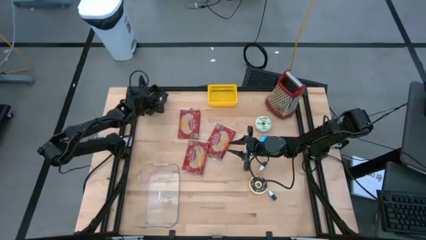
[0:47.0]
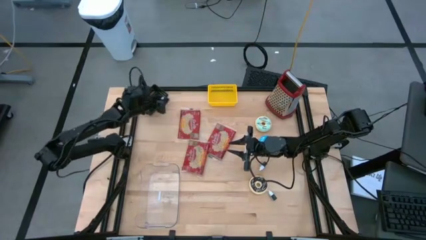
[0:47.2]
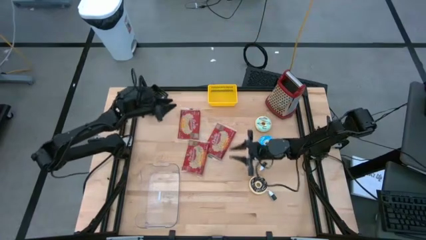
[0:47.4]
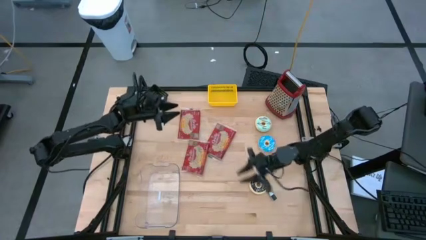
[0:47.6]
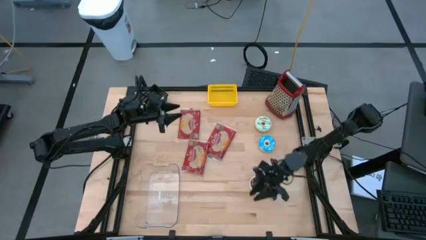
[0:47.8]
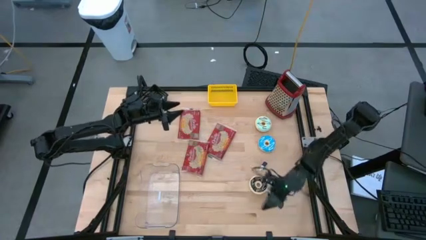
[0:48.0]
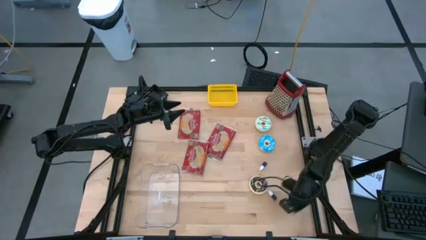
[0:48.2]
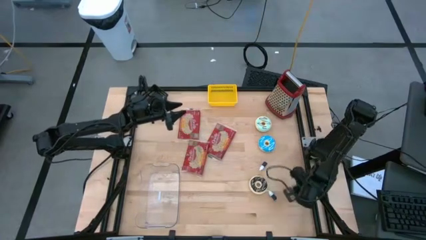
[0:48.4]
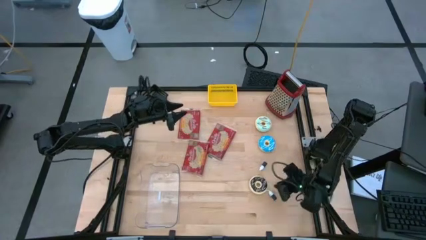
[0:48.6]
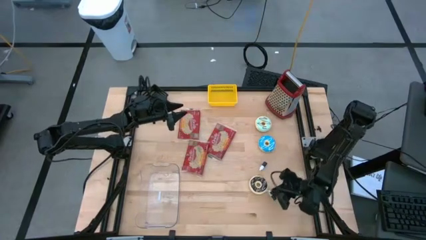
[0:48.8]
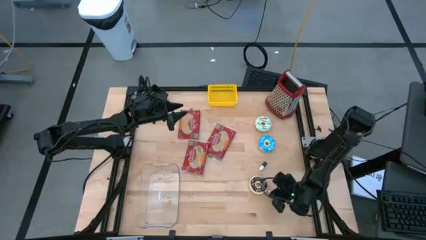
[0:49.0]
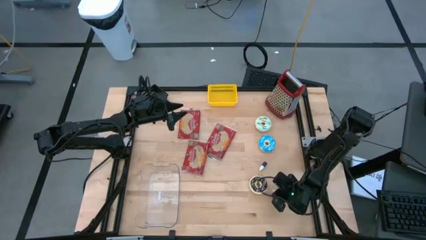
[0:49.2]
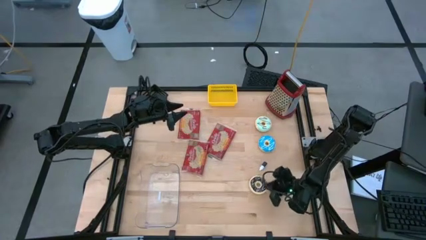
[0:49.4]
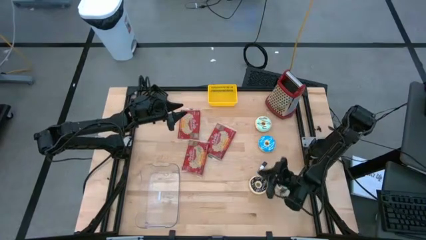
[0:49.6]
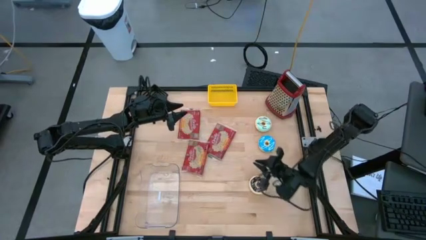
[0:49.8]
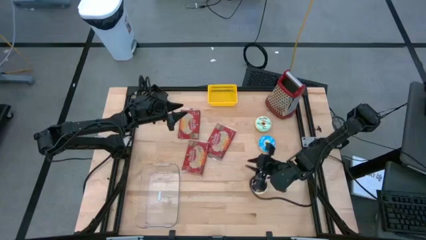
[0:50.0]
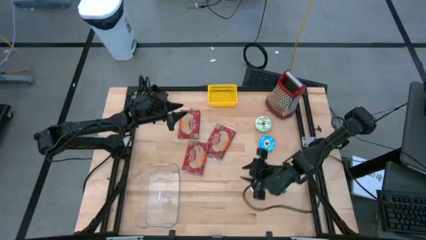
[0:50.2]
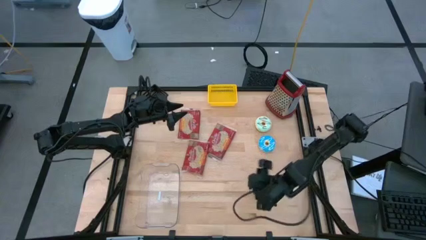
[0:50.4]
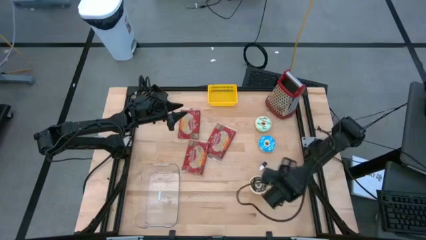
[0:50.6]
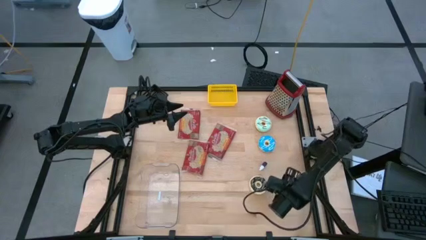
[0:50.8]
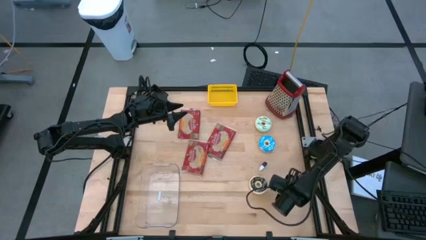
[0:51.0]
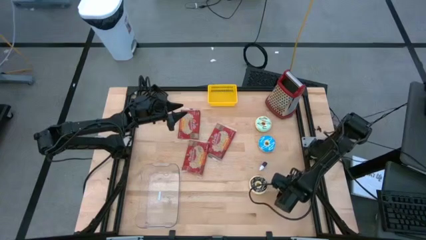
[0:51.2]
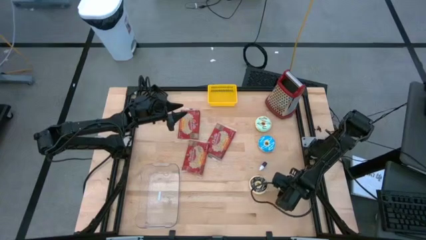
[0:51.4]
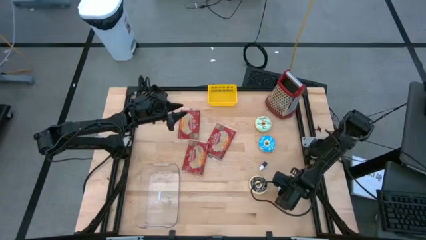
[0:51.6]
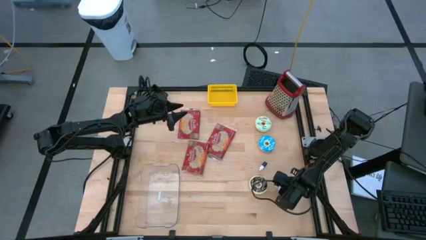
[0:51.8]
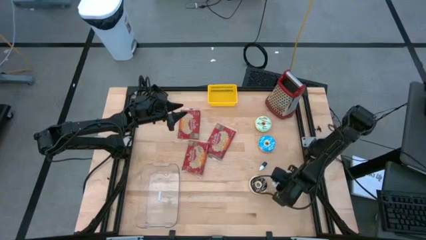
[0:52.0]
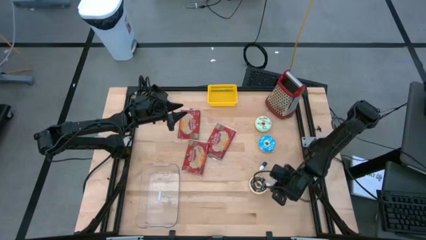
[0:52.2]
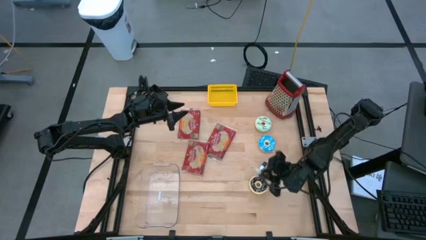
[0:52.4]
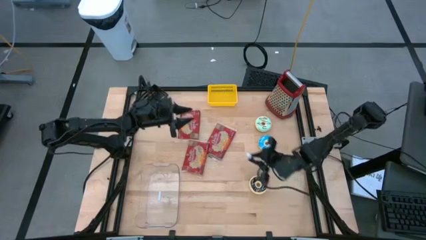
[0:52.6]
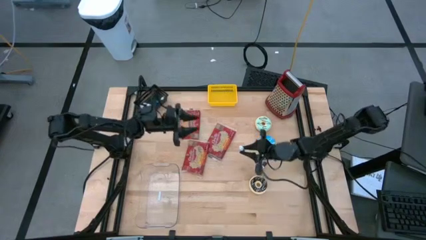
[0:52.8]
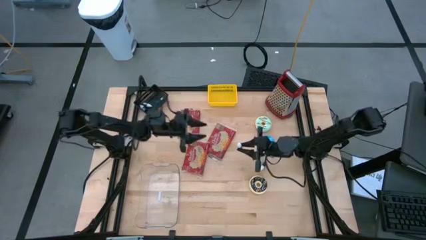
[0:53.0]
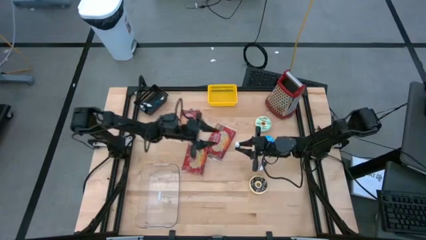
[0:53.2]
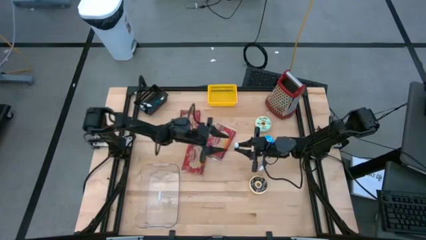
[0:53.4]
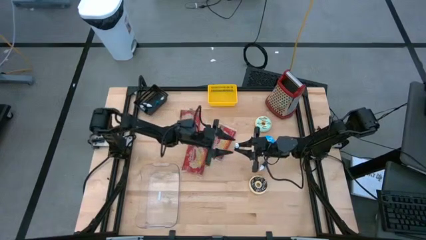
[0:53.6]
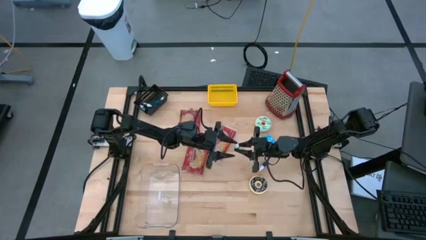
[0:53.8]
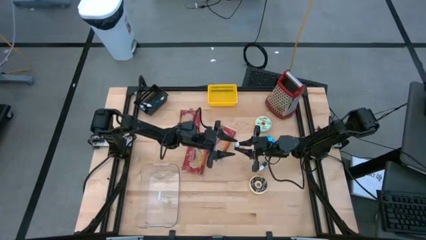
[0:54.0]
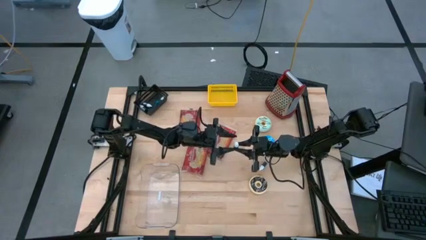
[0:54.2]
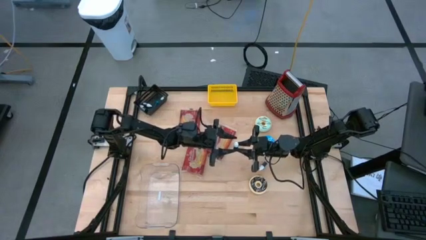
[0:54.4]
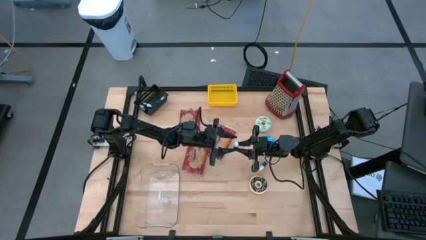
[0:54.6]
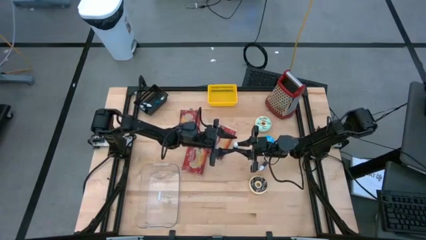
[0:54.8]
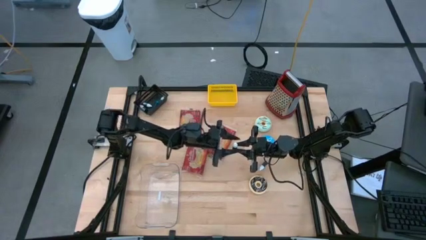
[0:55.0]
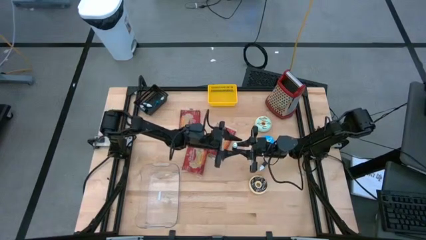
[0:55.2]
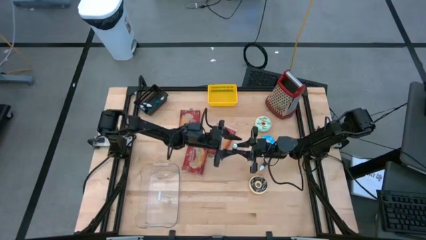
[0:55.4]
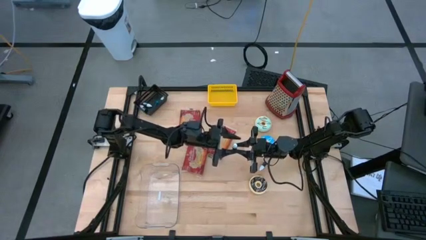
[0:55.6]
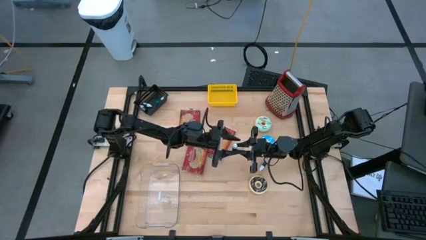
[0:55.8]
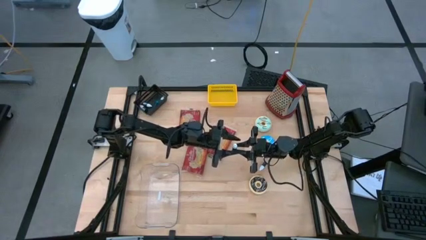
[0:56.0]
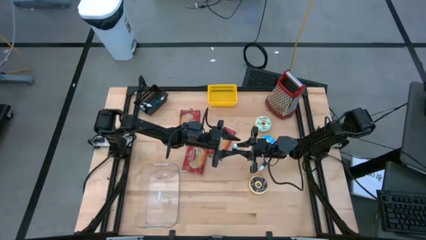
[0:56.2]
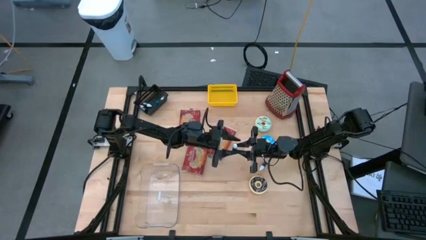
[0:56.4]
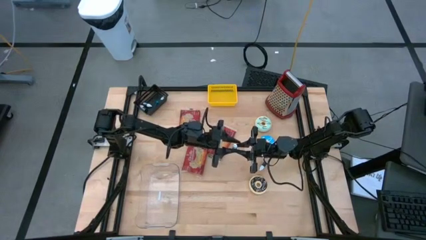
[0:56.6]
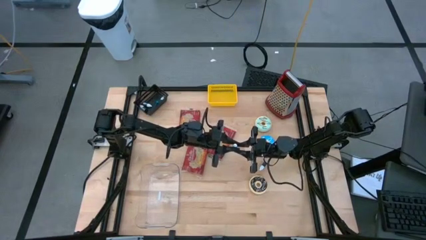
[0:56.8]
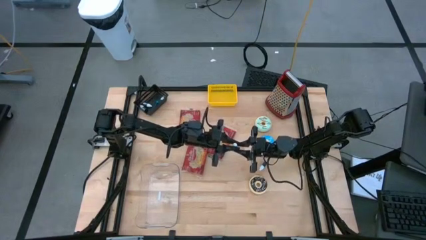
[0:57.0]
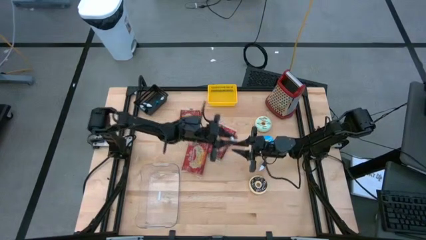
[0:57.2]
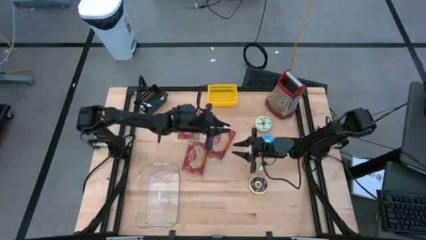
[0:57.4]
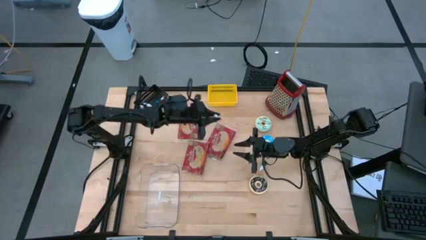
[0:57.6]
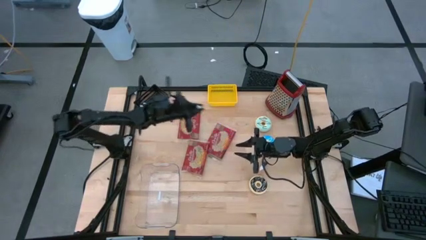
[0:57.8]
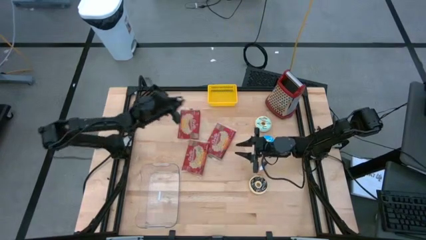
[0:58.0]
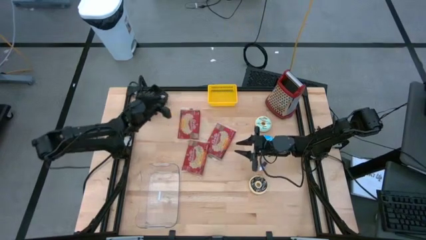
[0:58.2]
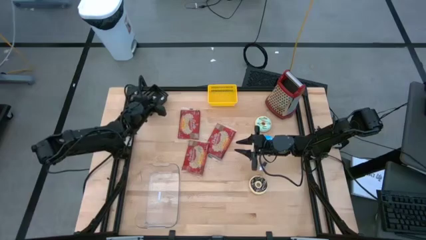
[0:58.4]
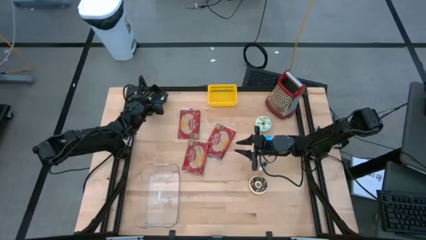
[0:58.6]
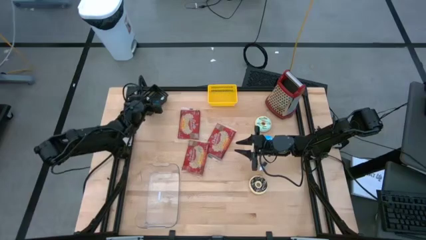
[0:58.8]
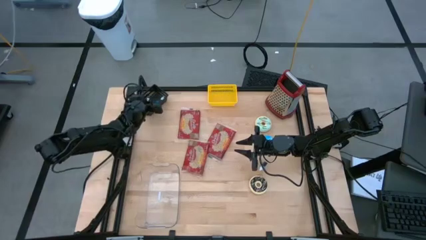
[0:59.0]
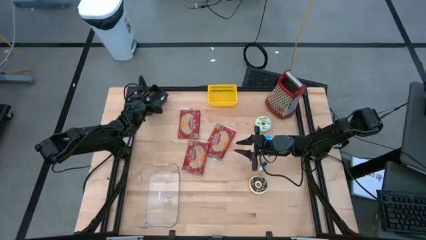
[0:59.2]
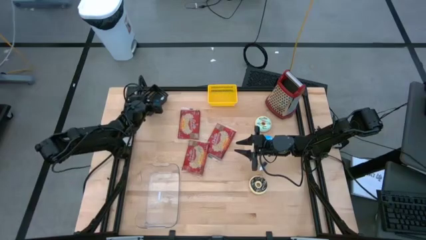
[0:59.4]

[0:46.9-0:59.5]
Put the green food coloring bottle into the black bin

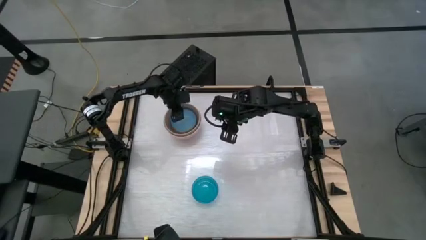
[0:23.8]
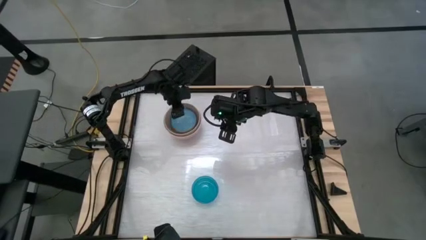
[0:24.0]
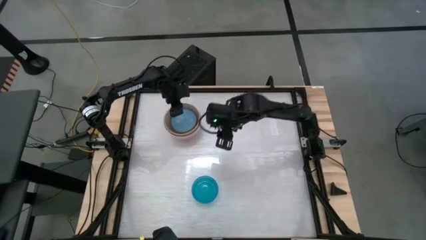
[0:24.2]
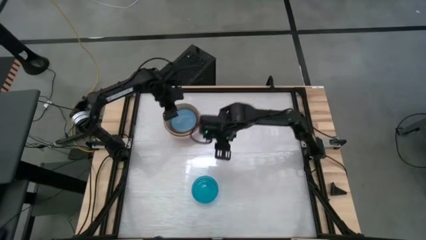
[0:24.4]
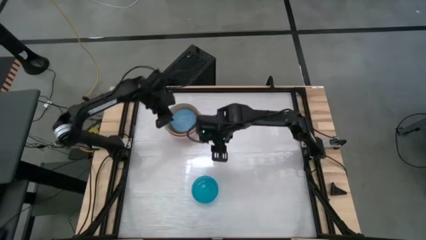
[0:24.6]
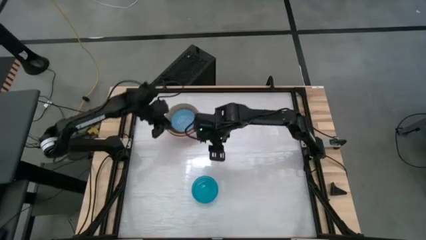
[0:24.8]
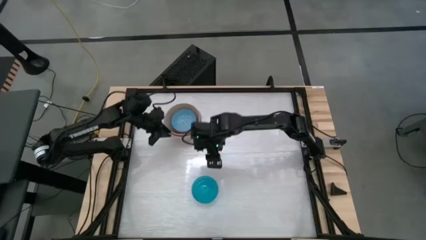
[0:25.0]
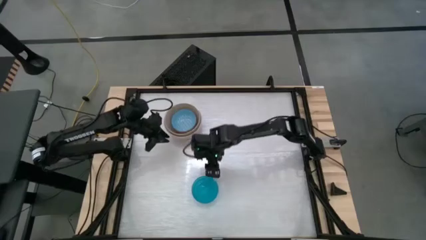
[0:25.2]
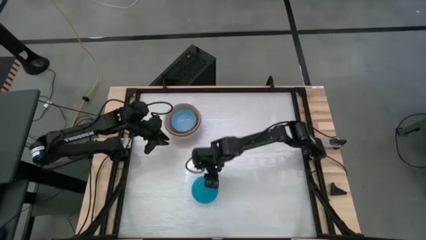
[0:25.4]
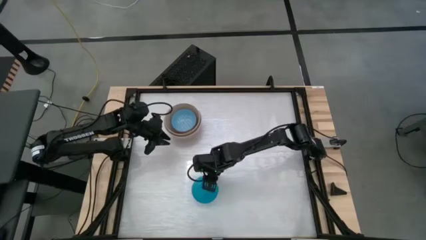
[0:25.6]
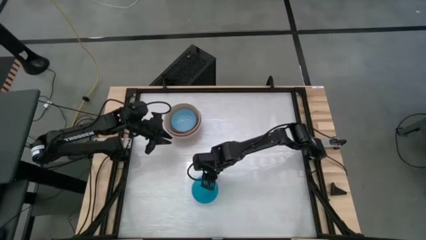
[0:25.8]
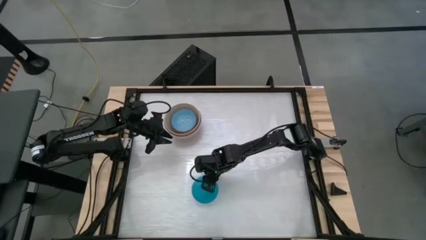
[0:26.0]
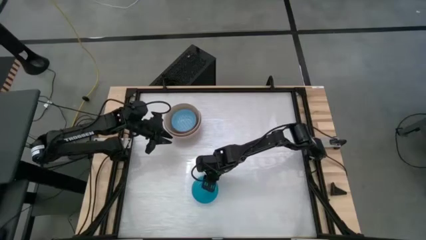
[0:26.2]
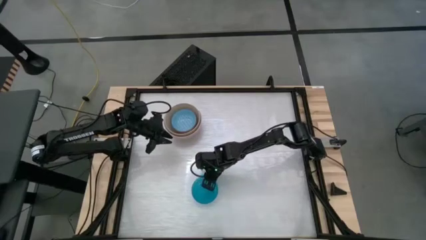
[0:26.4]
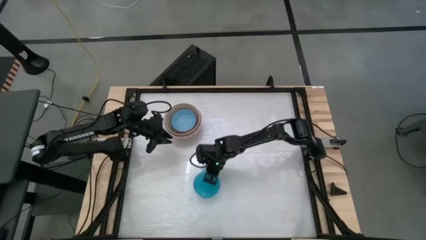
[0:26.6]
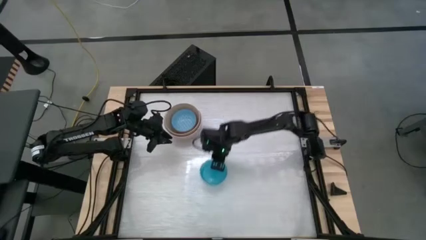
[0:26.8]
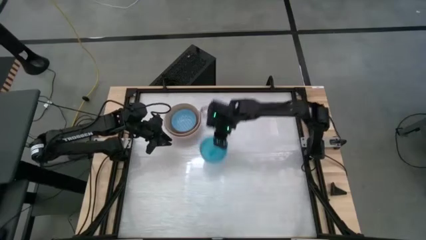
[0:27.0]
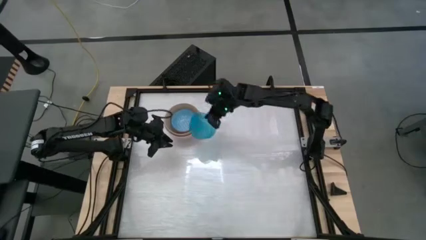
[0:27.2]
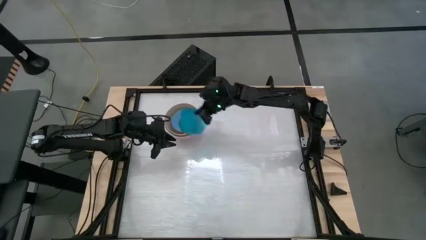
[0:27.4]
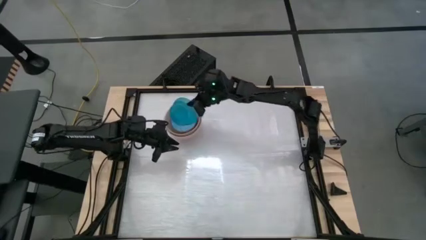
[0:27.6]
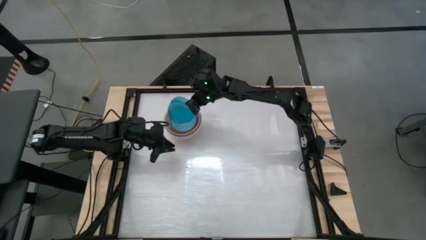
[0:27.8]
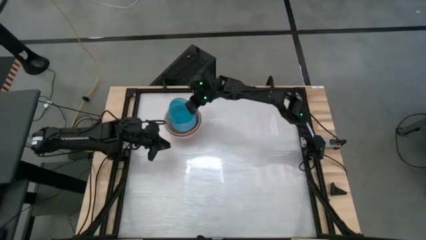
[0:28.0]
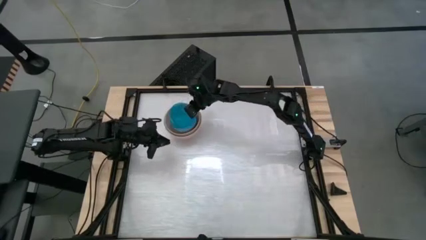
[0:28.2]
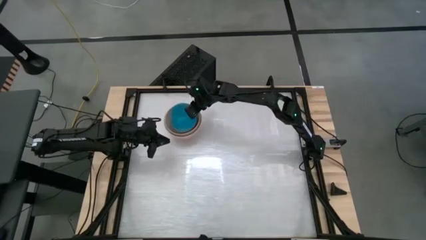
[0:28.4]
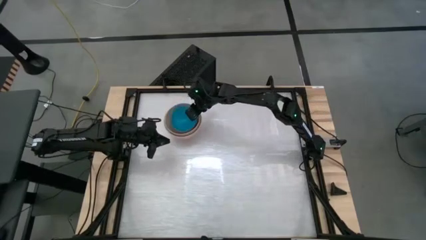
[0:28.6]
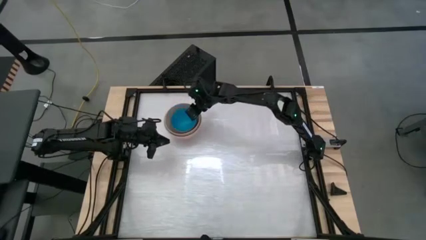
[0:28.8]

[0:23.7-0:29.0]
Stack the blue plastic bowl on top of the orange and blue ceramic bowl
